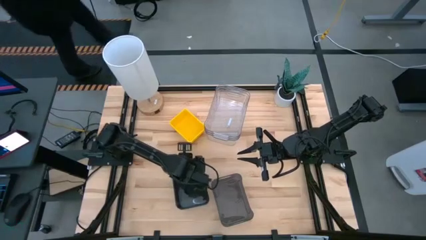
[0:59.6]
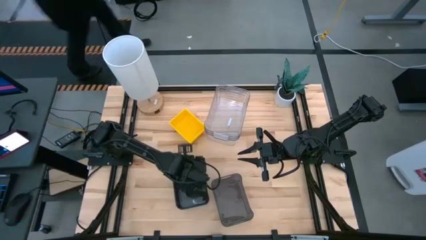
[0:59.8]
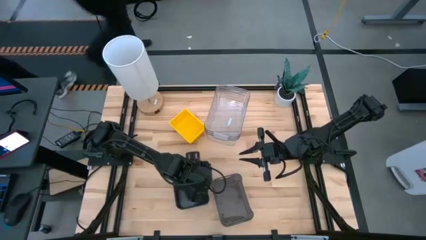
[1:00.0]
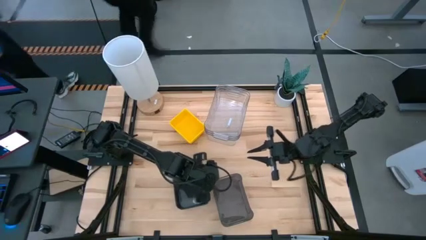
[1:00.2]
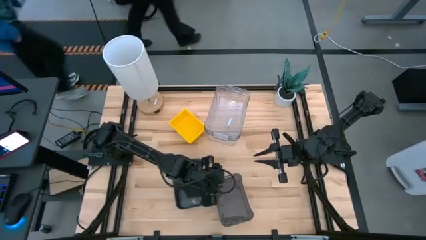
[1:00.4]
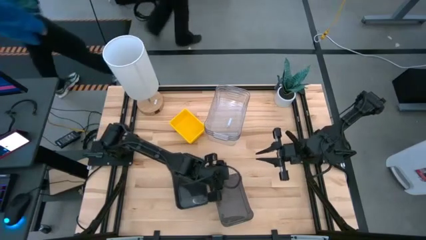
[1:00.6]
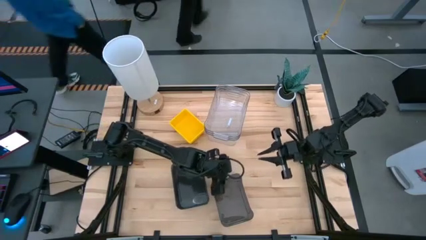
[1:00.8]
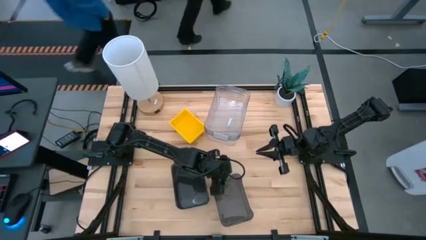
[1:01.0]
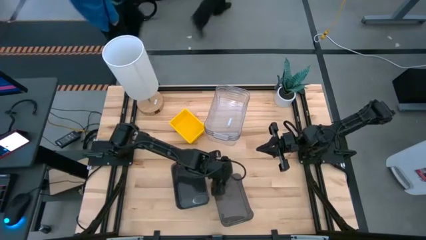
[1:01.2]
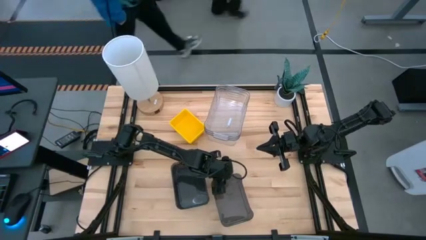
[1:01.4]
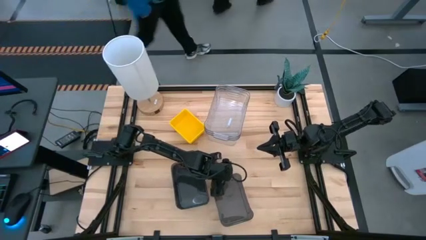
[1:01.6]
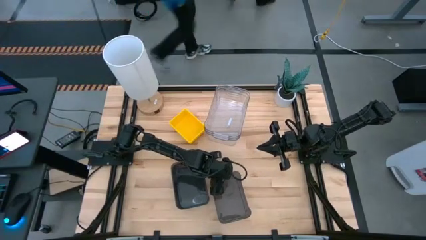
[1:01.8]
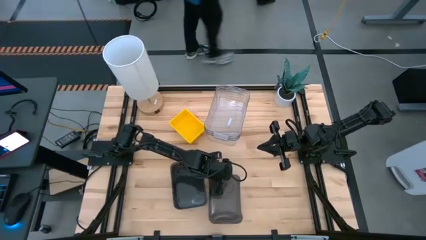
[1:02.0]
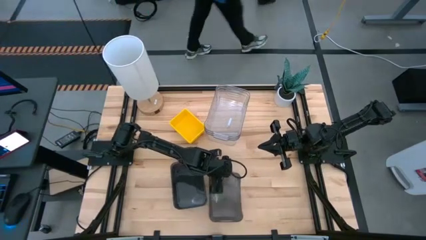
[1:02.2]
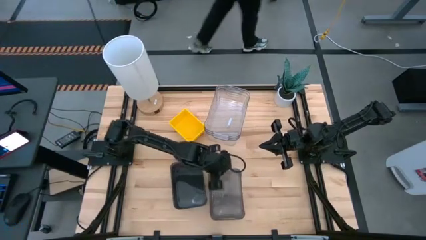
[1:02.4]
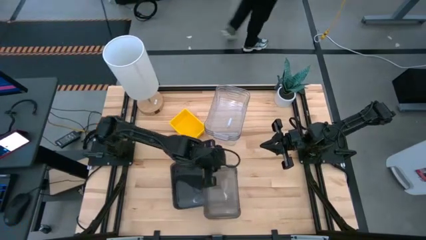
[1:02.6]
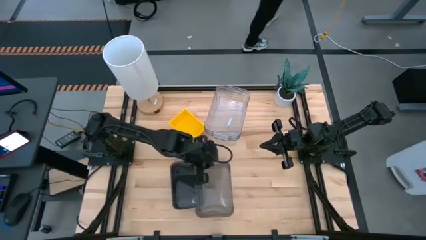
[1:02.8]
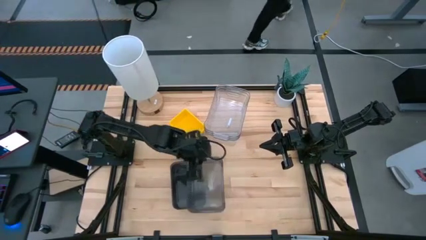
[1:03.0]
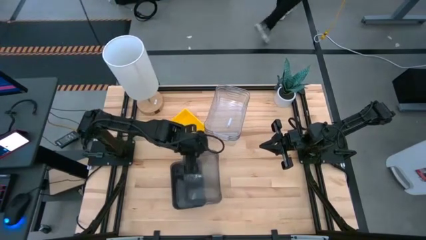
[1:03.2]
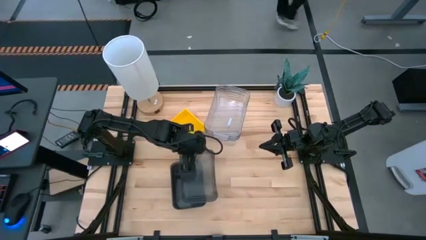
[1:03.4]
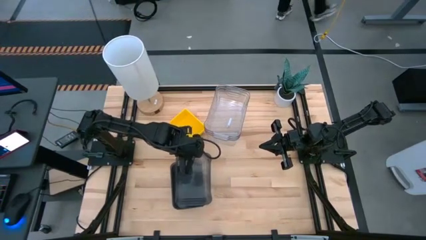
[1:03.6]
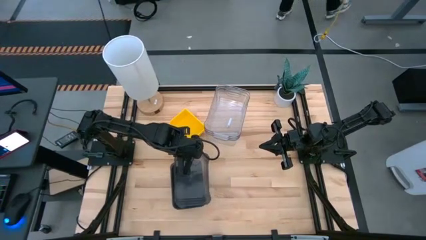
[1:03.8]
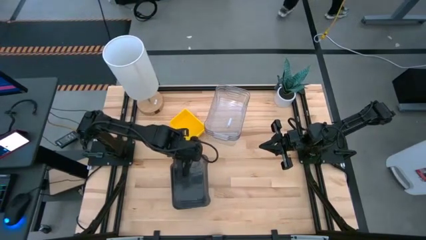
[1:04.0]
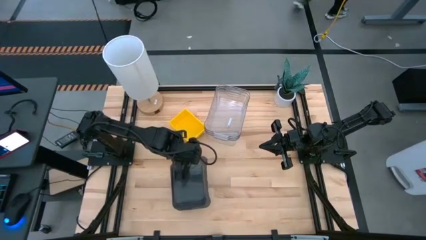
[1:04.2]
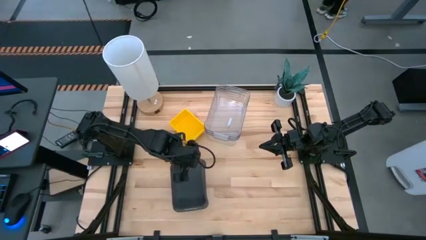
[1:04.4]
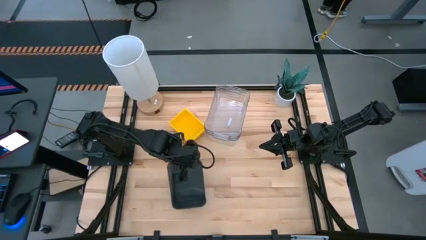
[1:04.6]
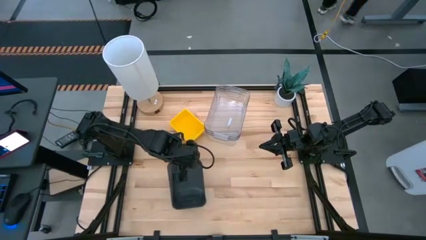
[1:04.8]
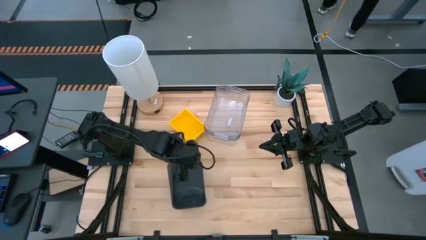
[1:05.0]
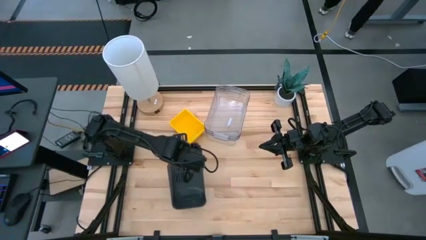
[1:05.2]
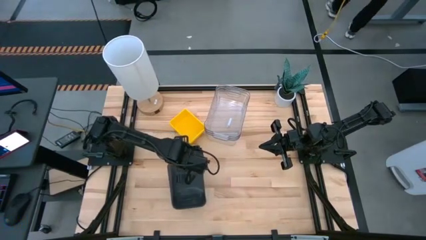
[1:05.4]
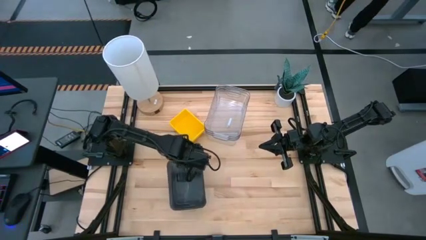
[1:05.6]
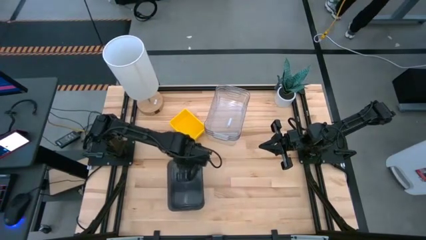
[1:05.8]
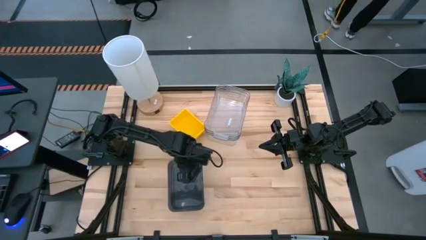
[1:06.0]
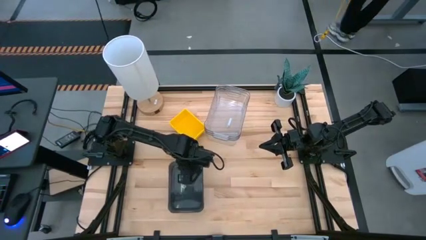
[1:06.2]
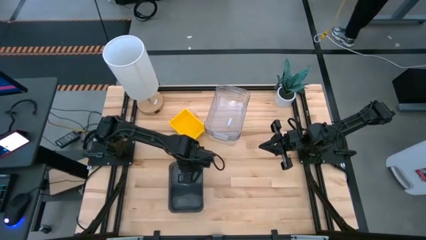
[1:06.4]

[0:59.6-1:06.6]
Stack the black bin on top of the stacked black bin

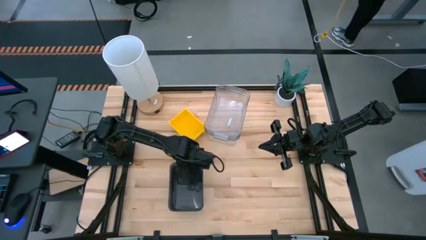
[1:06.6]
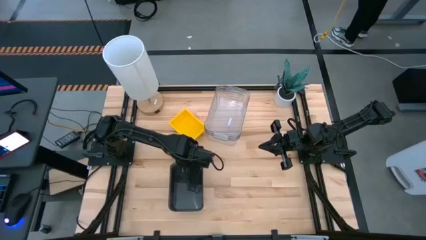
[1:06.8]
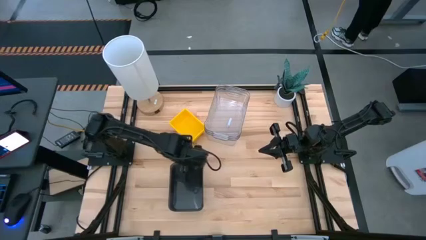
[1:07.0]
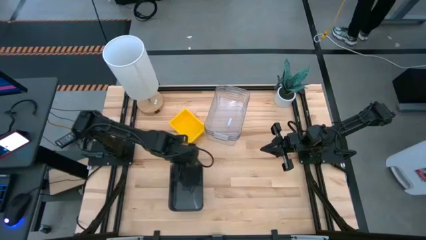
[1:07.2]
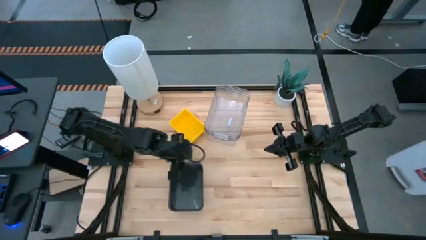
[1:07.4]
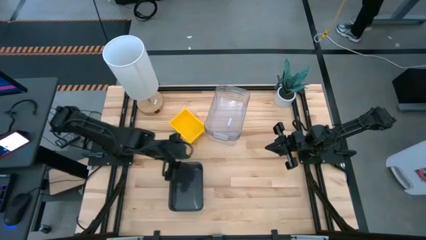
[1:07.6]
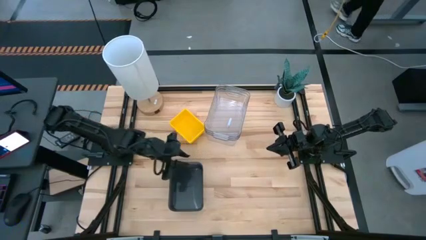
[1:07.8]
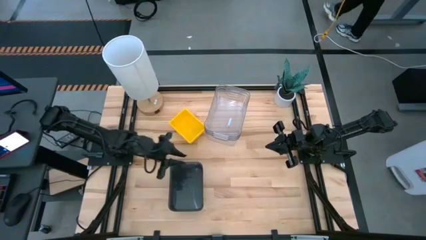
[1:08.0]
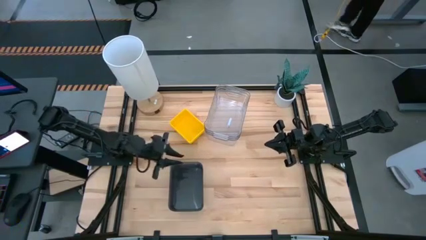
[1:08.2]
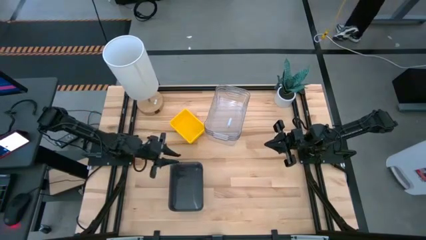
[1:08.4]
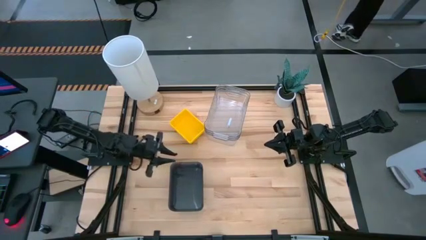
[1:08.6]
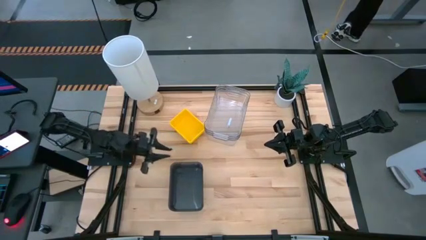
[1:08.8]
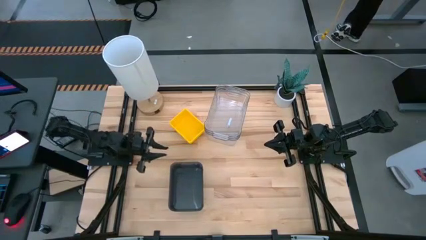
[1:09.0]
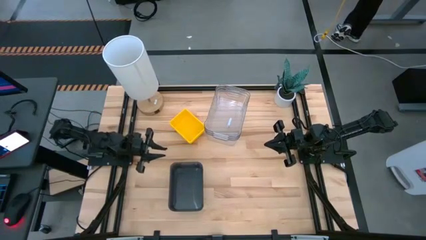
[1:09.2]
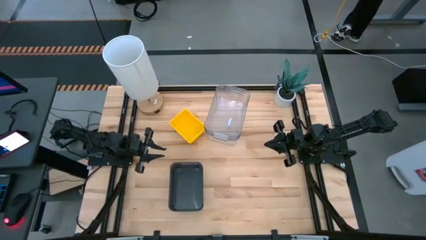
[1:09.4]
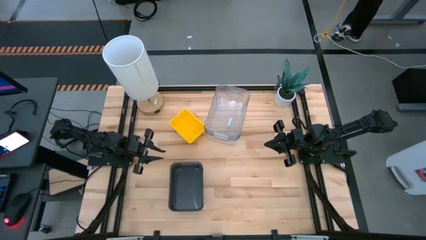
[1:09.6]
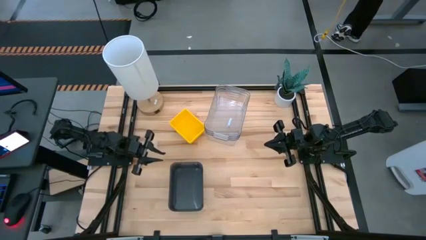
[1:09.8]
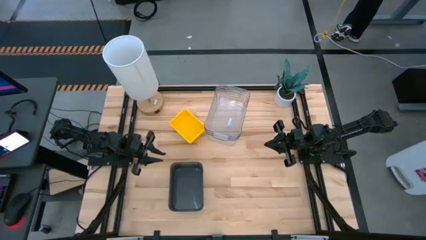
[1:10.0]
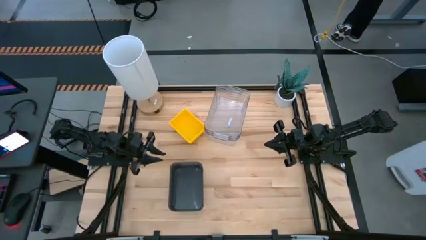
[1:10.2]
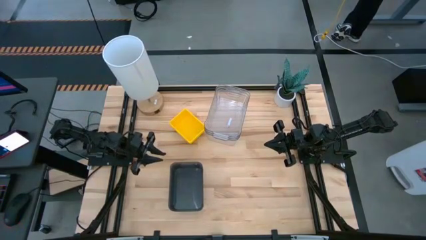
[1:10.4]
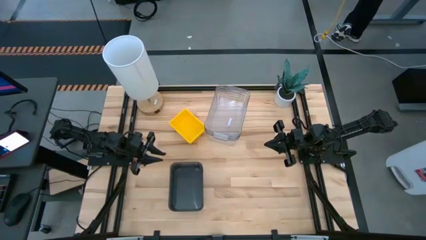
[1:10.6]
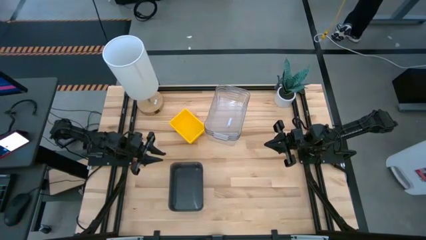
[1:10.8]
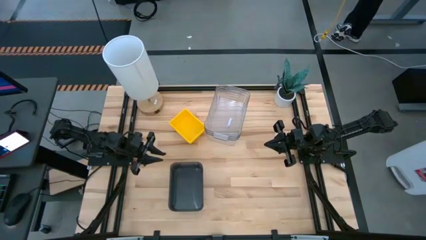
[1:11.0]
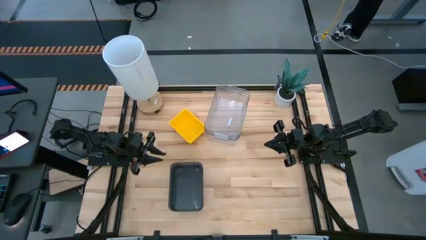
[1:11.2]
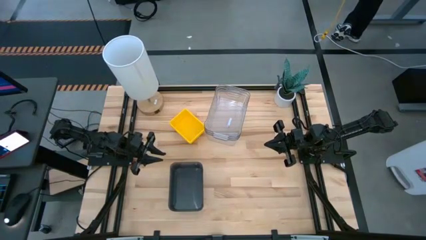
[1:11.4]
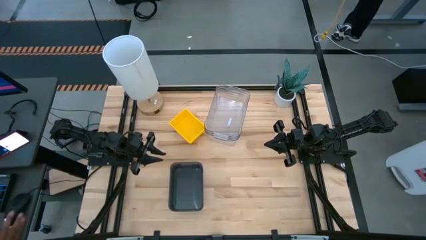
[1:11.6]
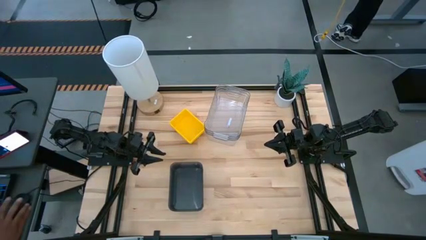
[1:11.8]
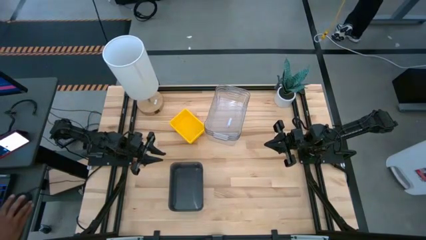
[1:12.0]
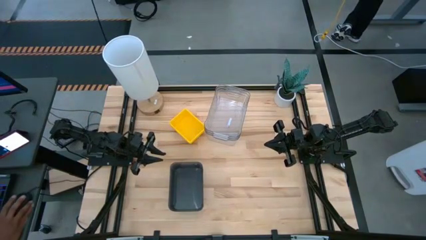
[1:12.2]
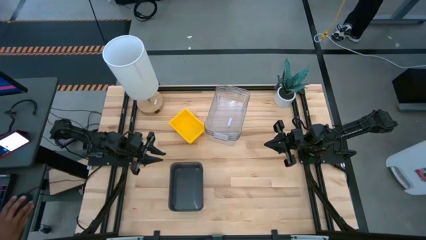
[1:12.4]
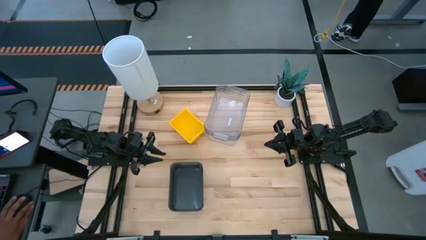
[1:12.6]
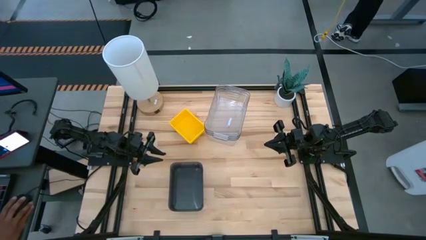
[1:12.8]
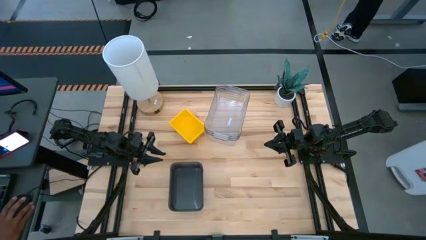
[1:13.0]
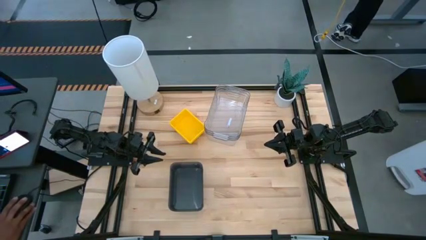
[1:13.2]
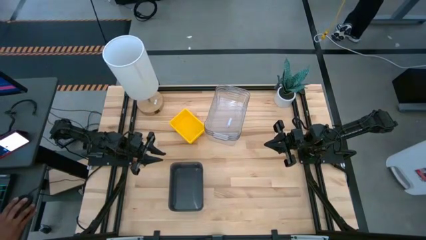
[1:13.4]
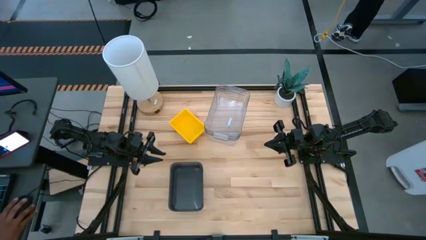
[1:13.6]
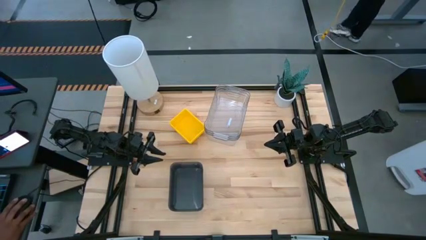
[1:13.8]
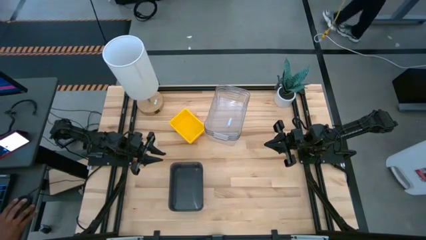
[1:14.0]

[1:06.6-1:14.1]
Return to Home Position
